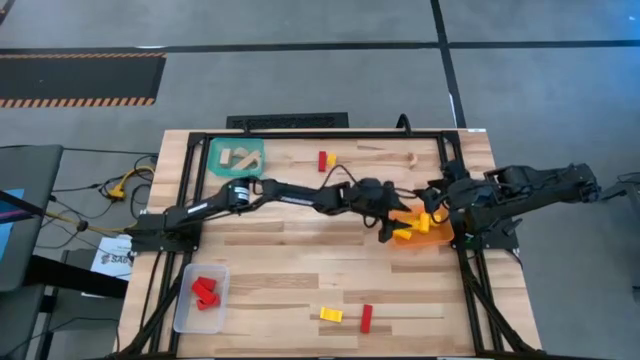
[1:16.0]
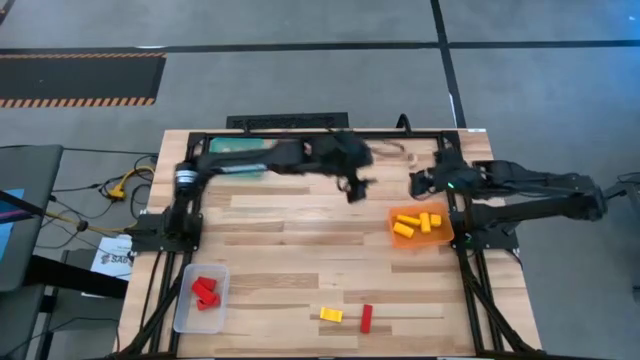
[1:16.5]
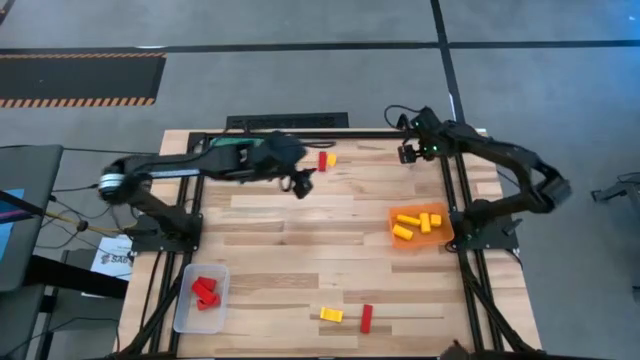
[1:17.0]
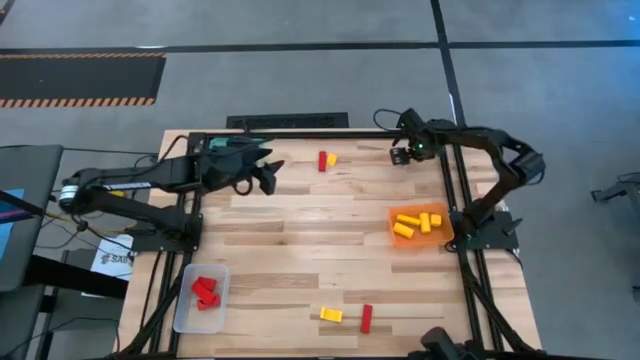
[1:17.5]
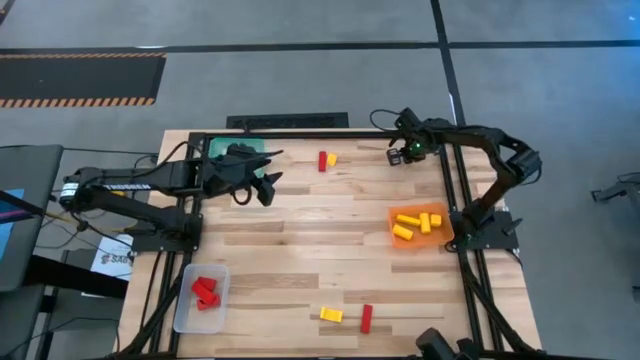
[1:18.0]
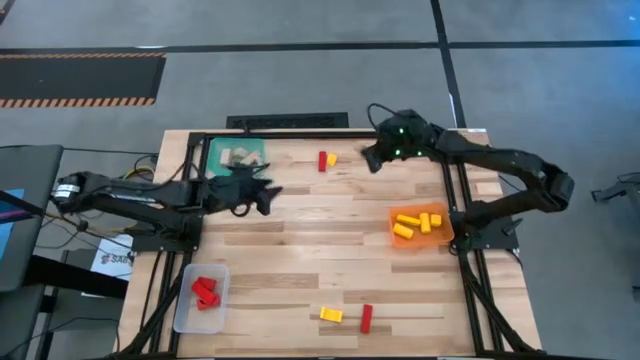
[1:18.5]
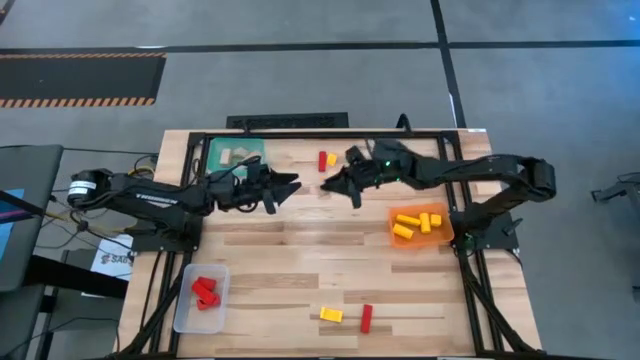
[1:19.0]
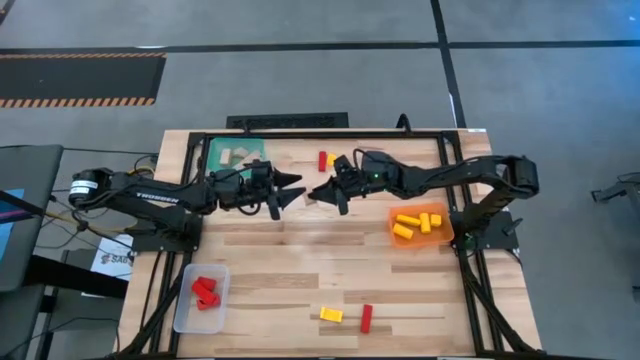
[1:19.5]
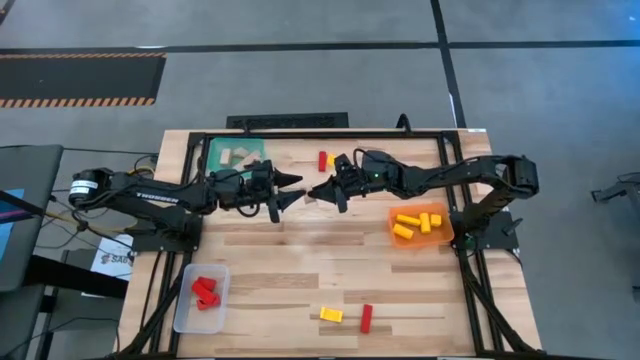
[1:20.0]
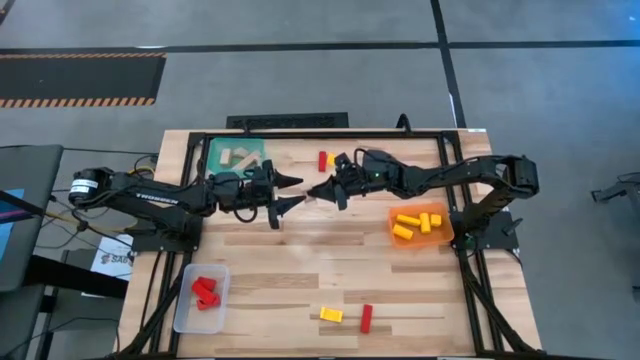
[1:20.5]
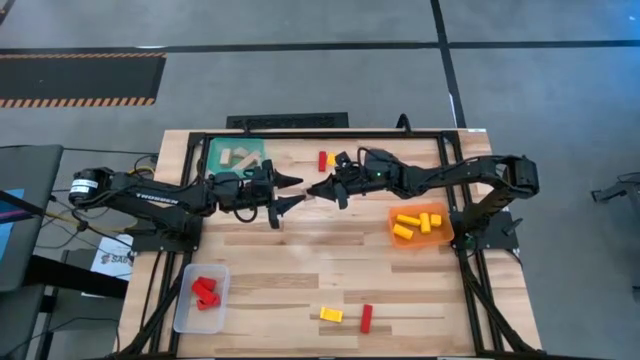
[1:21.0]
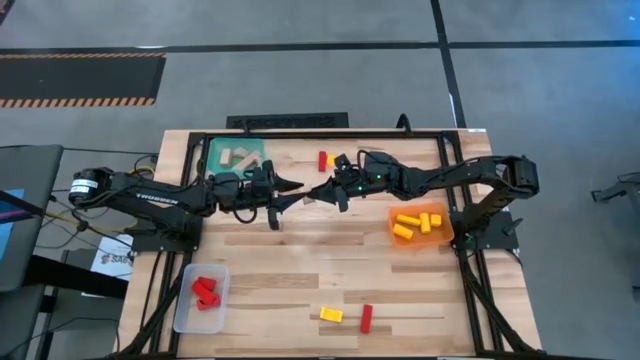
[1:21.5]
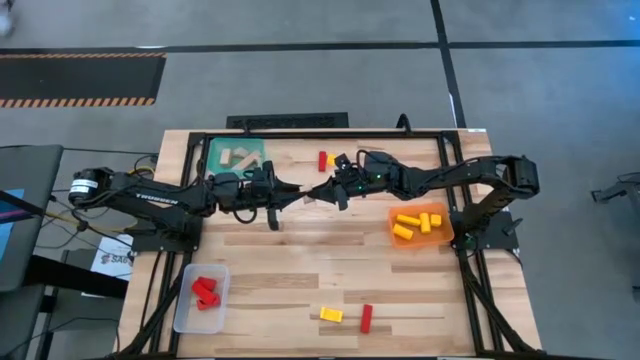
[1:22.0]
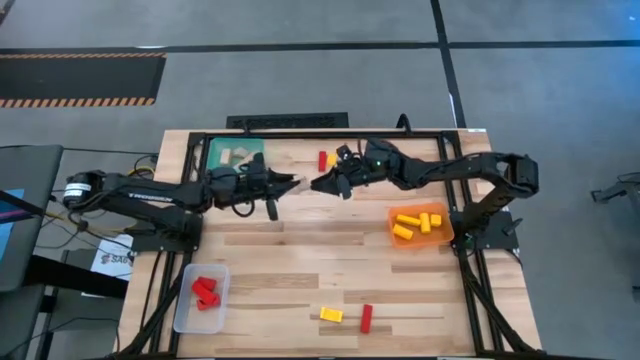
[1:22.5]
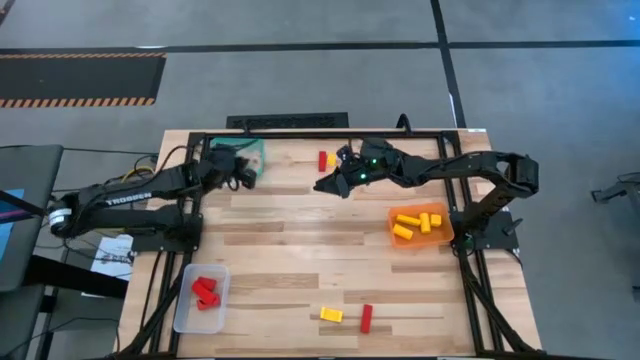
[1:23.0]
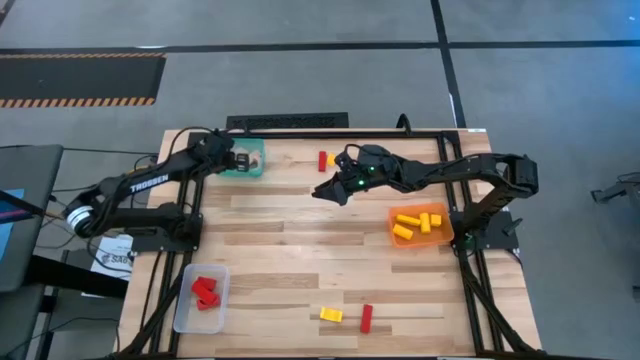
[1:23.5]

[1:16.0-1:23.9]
Task: Sort & place blocks by color
Put the light brown block into the light blue bin

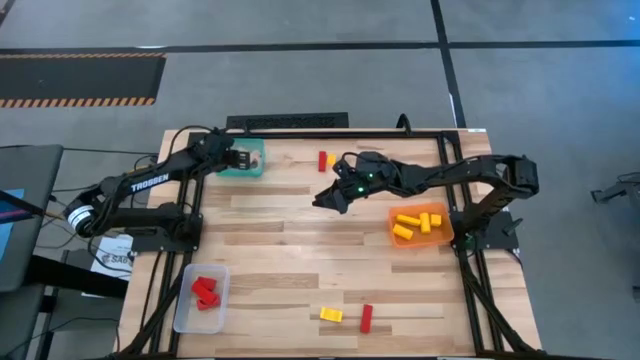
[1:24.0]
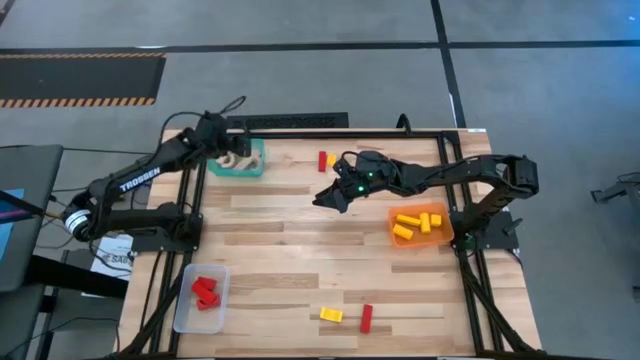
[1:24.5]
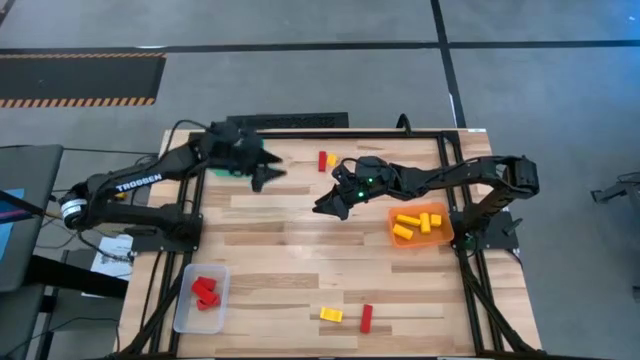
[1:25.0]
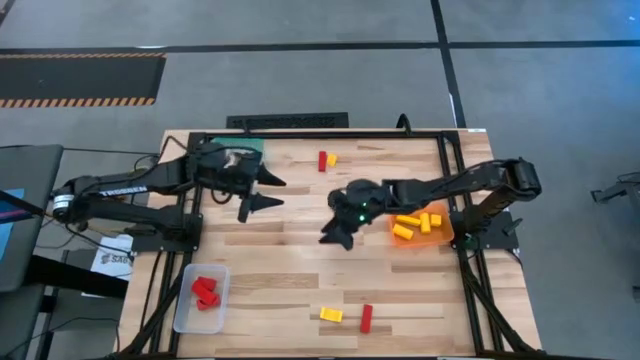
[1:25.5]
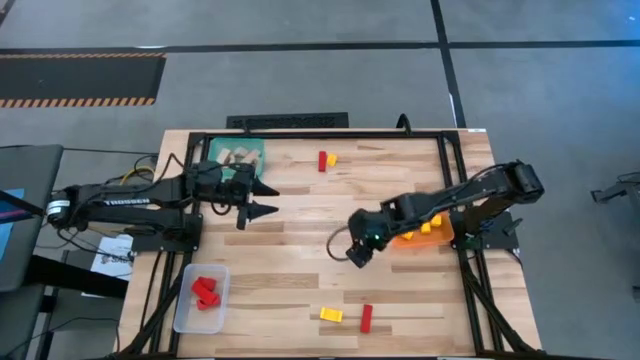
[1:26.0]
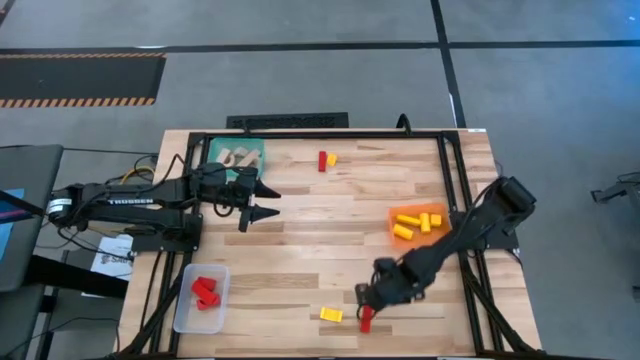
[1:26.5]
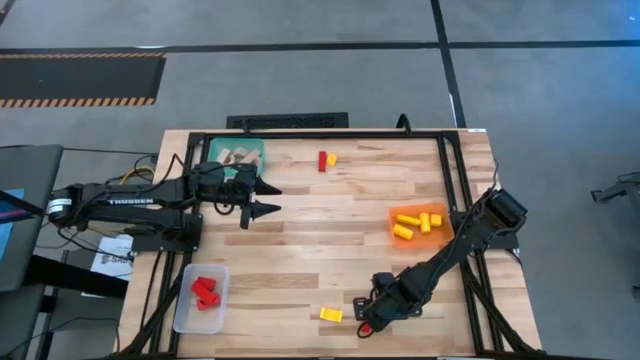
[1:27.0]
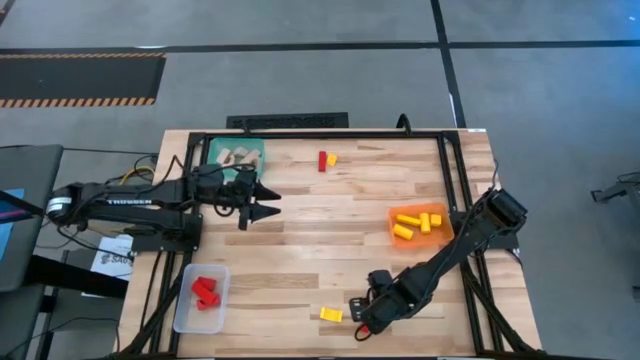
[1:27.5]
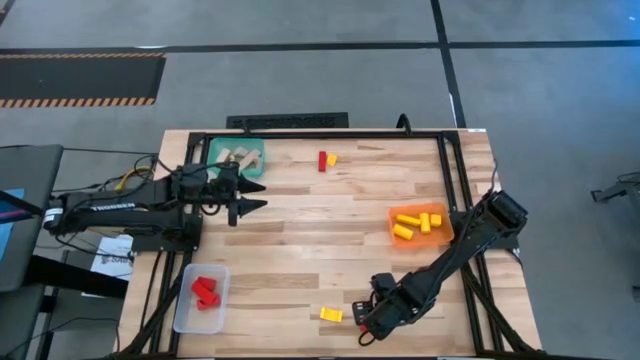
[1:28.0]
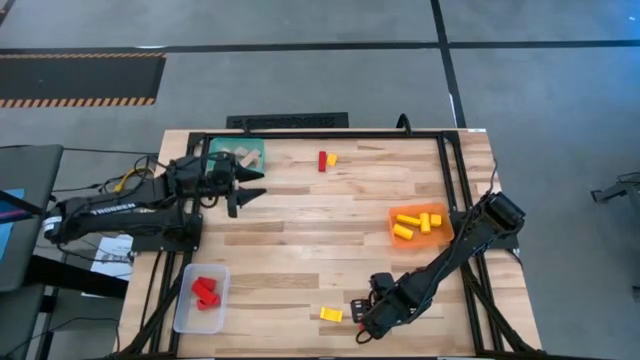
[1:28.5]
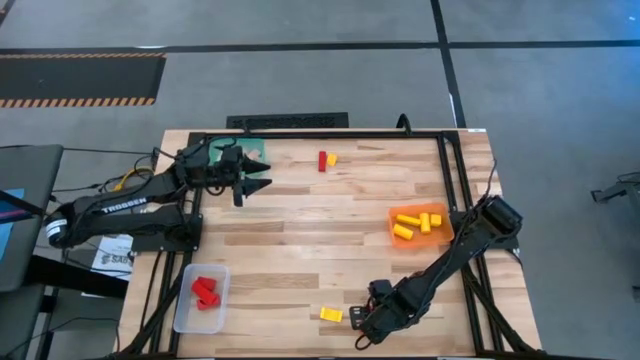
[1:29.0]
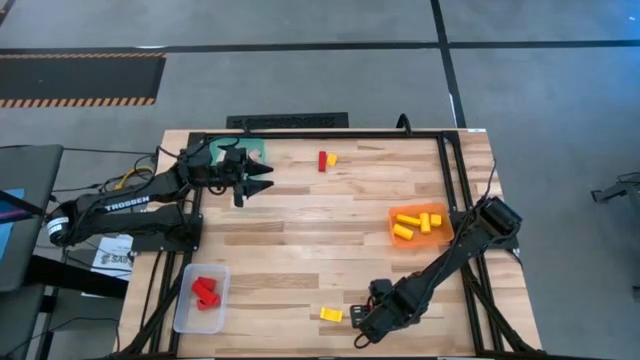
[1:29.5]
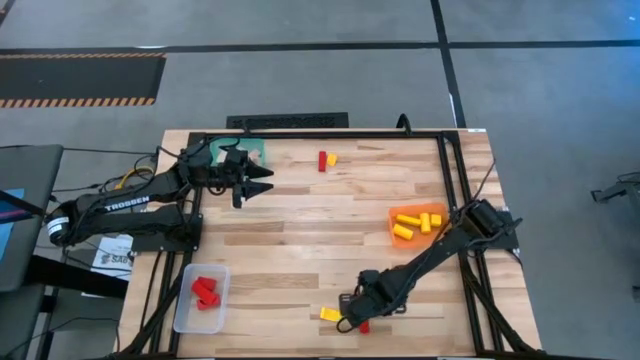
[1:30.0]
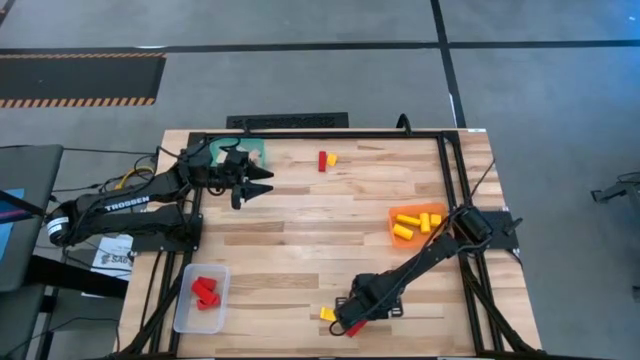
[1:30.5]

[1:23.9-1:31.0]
Put the red block into the transparent bin

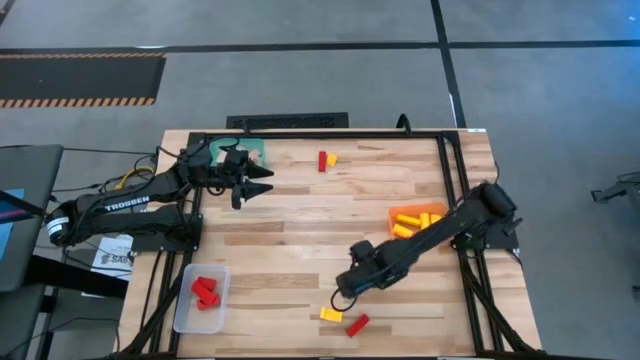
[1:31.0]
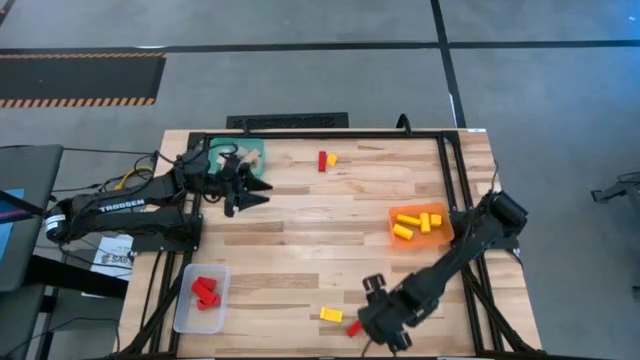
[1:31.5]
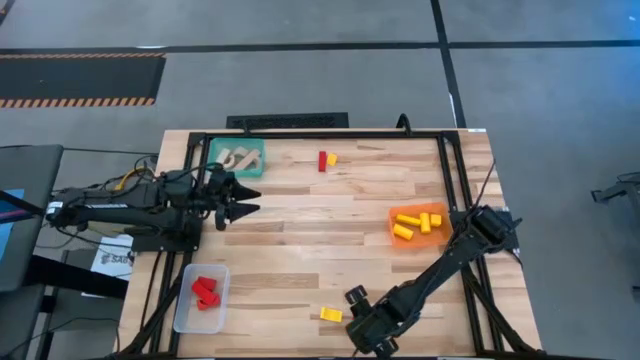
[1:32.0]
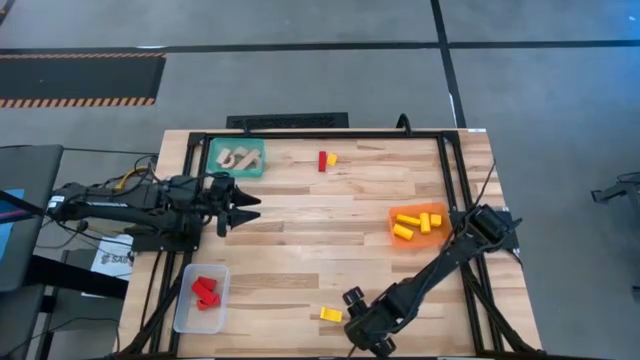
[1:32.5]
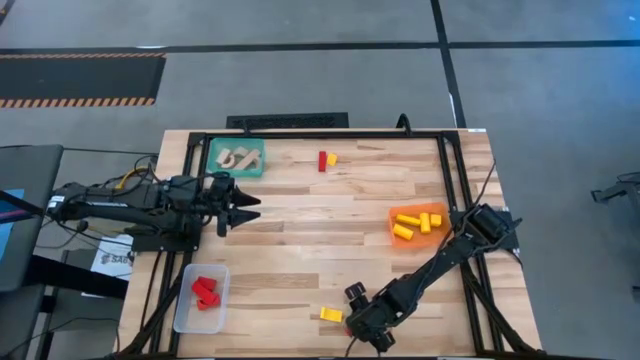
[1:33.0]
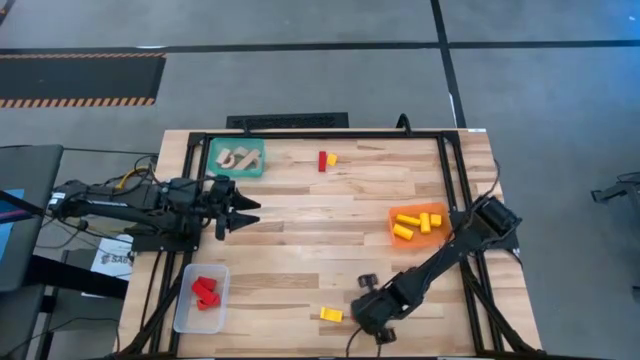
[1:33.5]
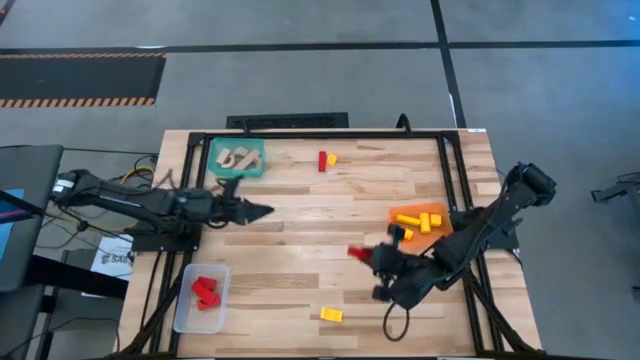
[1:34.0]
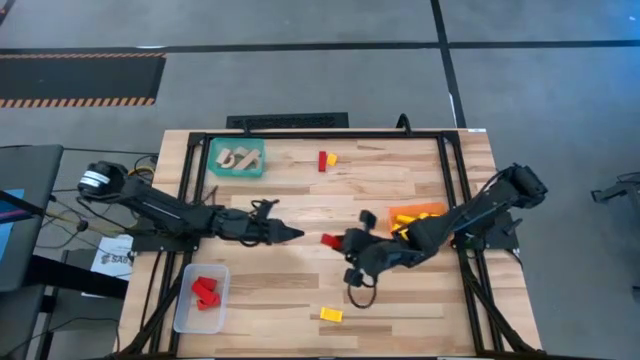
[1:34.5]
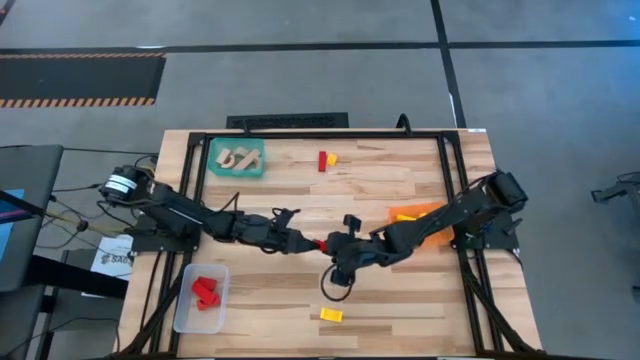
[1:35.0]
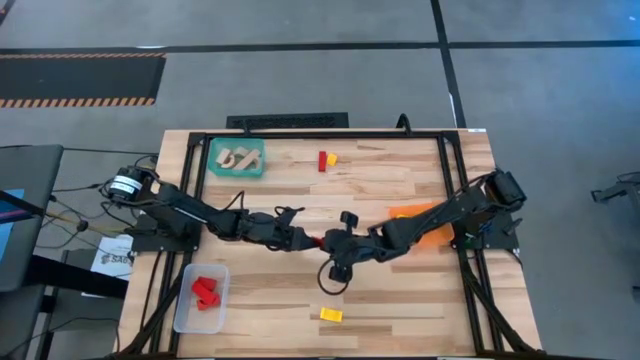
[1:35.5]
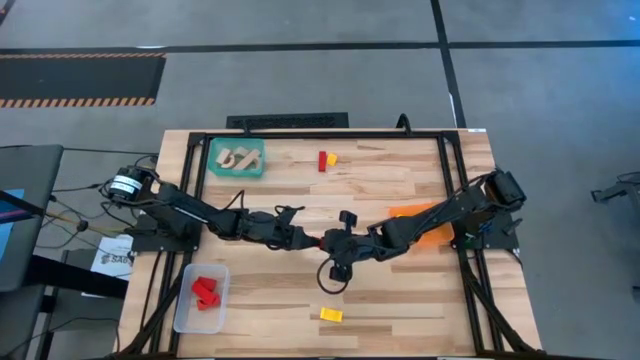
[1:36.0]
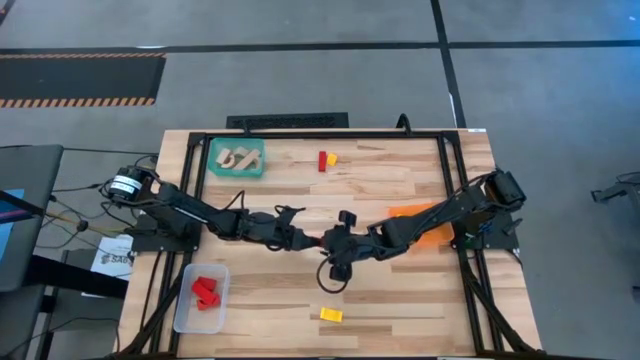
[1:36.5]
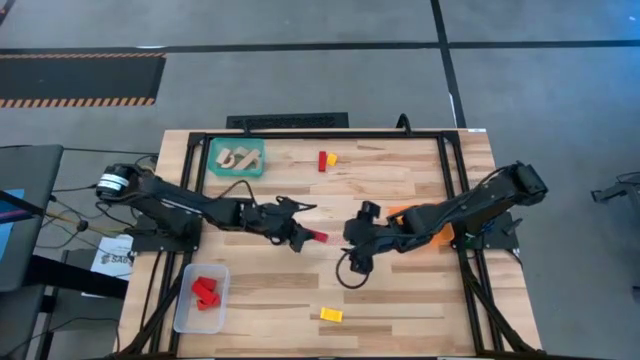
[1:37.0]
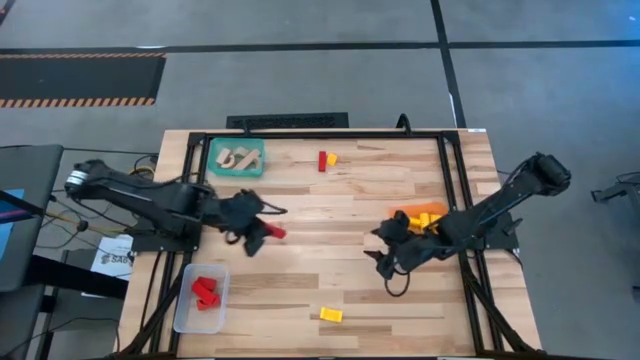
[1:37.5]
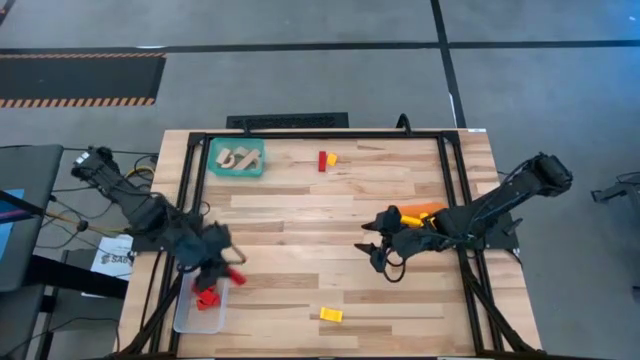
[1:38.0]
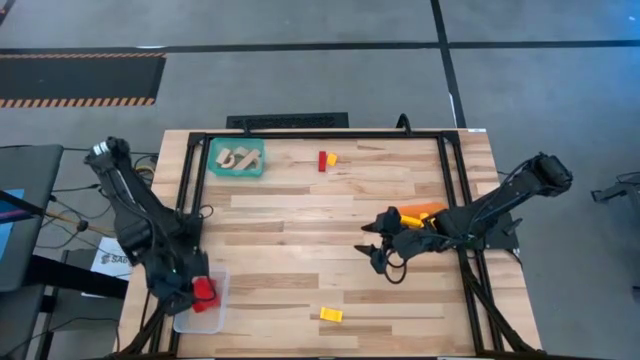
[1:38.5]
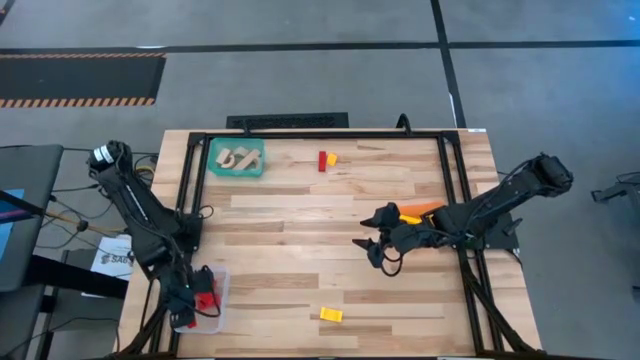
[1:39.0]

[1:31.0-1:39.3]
Put the red block into the transparent bin
